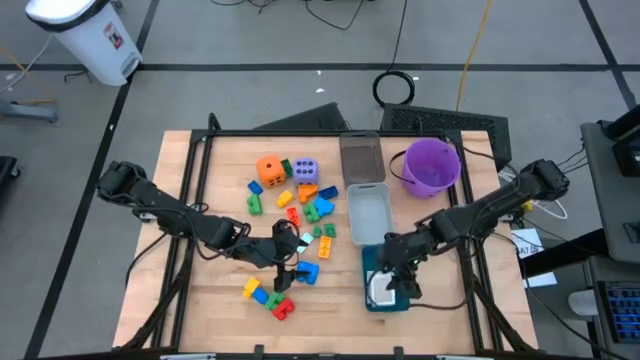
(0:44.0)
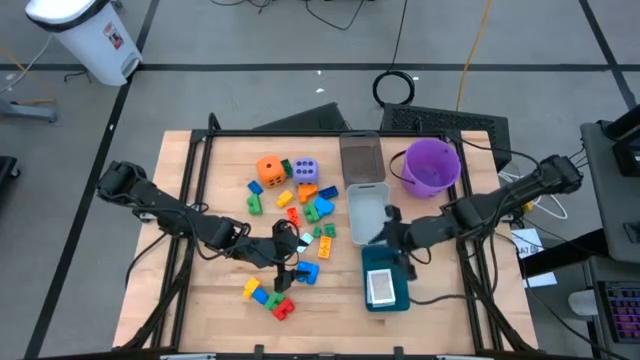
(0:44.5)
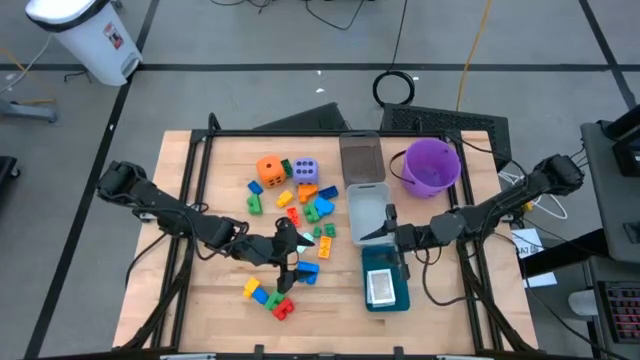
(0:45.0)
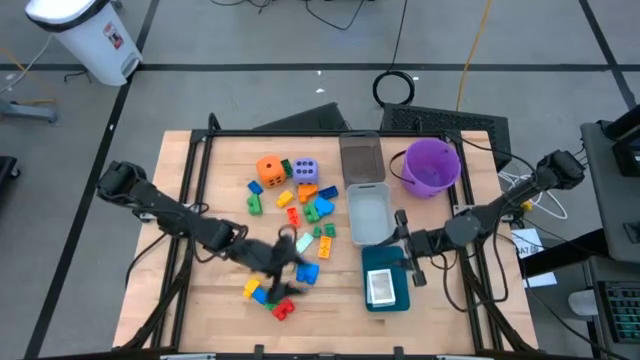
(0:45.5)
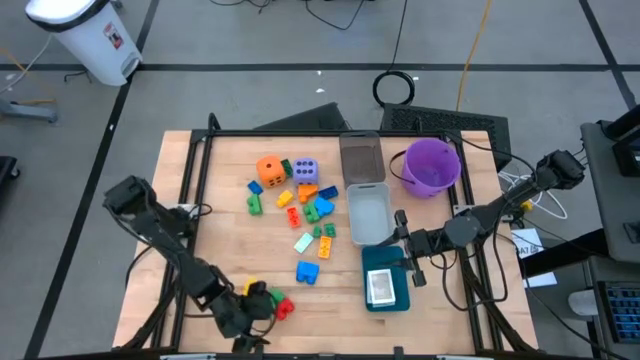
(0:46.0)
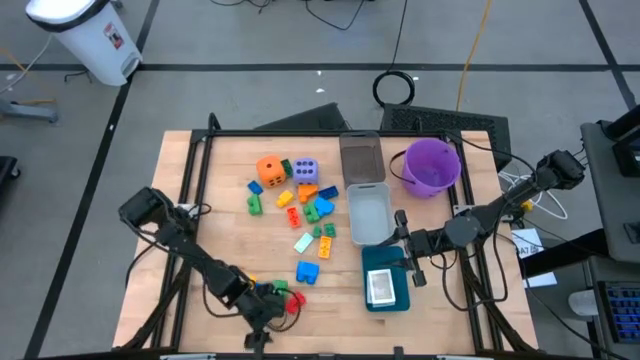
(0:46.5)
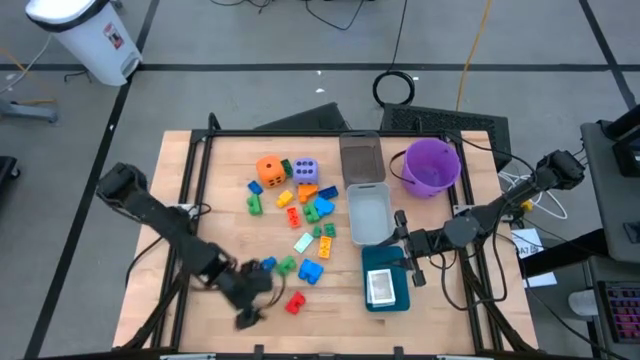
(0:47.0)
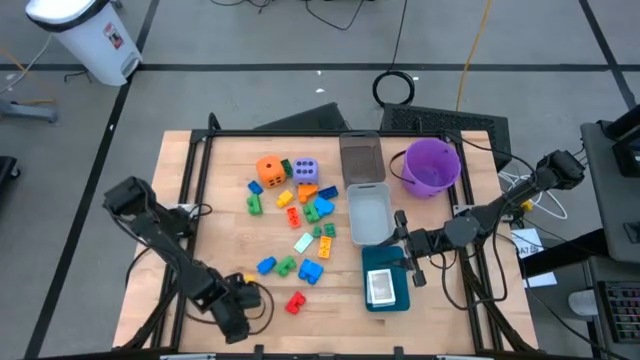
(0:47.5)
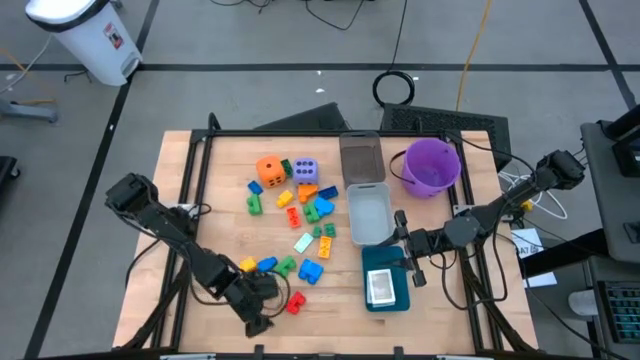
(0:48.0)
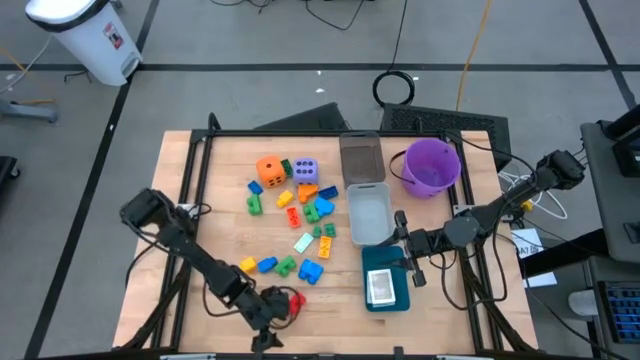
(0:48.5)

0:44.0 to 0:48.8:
Task: Pick & Place Toys
Adjust the game piece on the table

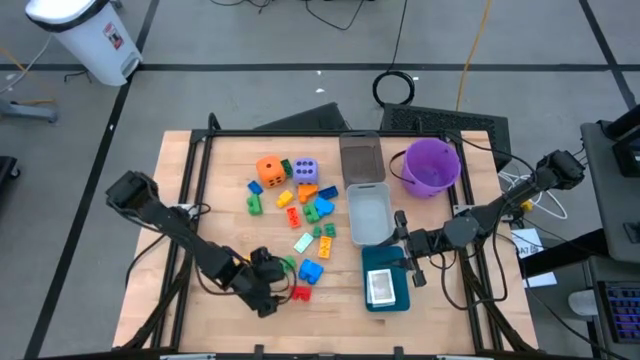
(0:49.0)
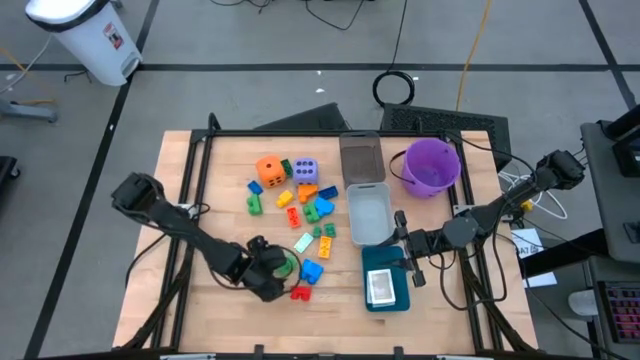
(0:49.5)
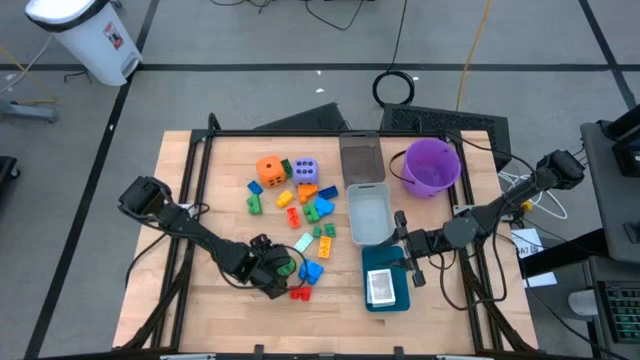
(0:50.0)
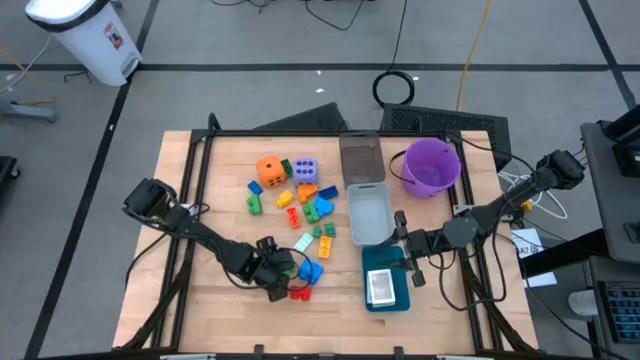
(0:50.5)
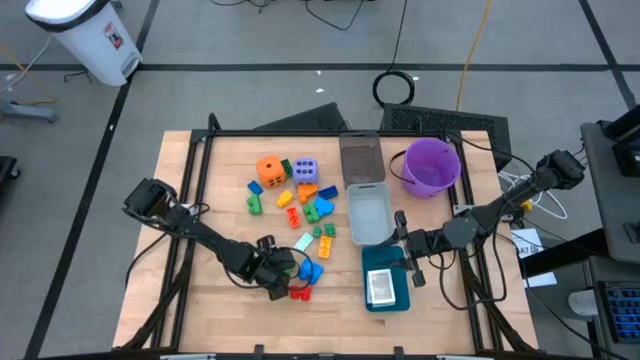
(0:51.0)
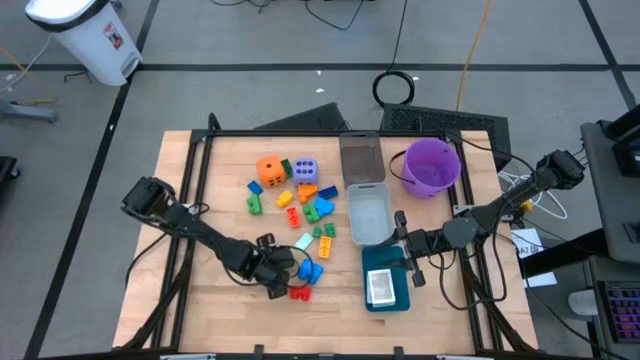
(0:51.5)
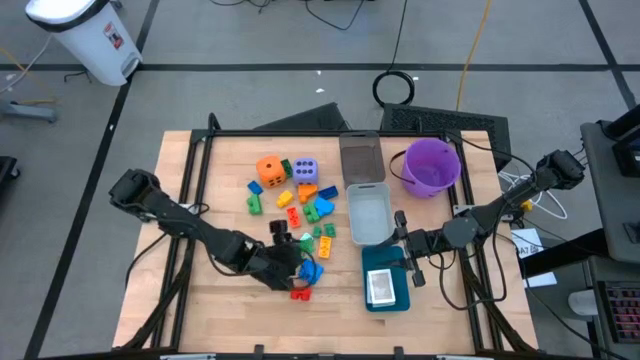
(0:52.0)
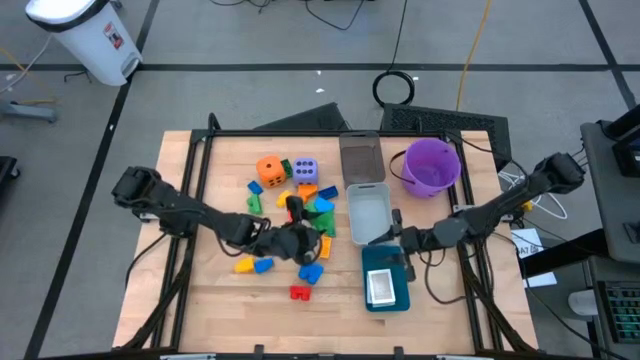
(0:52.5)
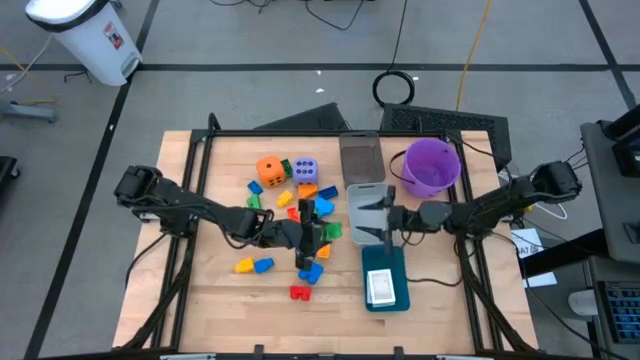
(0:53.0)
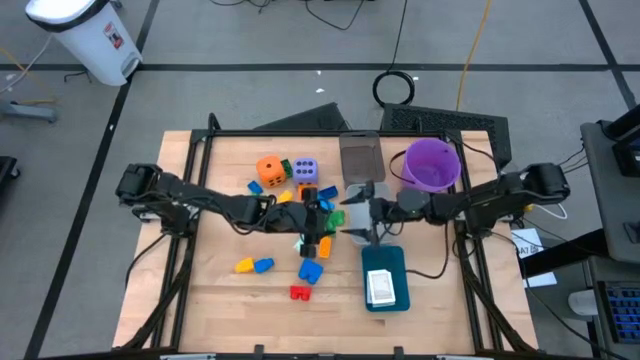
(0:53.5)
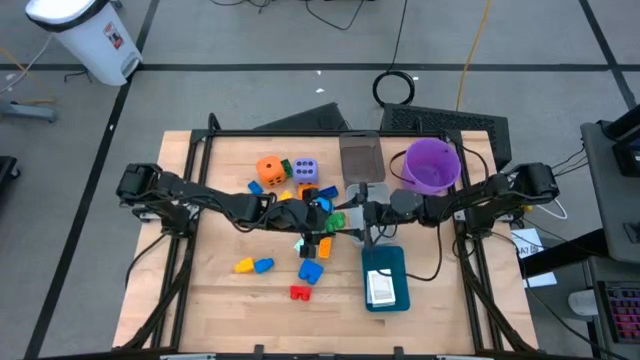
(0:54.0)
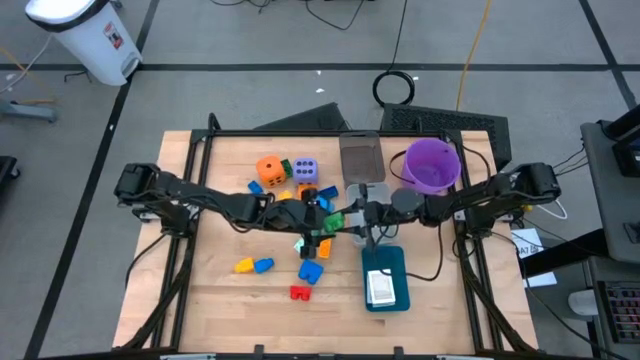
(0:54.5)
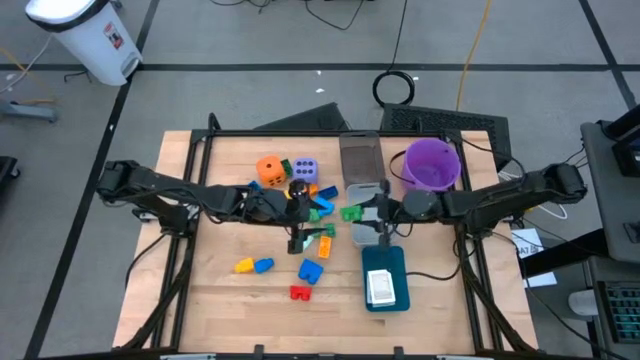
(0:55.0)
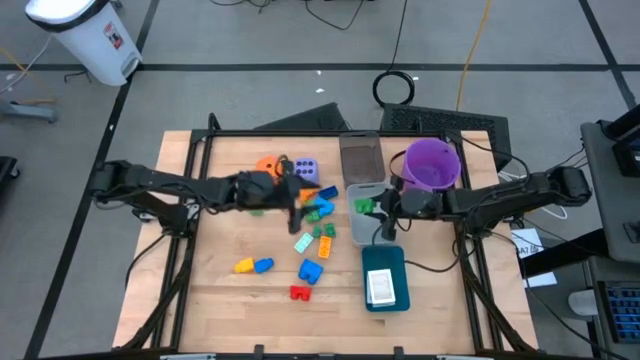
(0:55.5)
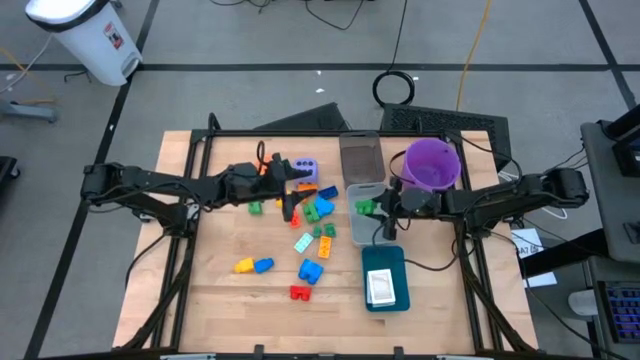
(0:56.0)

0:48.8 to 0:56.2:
Put the green game piece into the gray bin

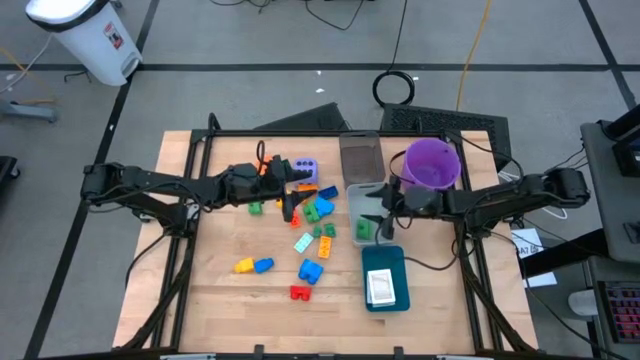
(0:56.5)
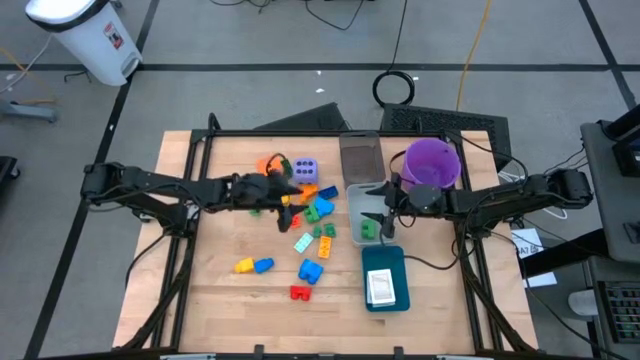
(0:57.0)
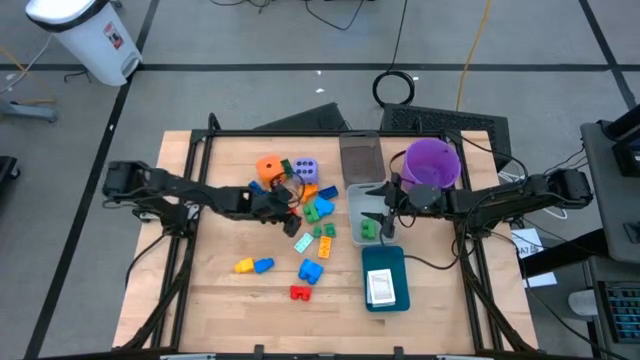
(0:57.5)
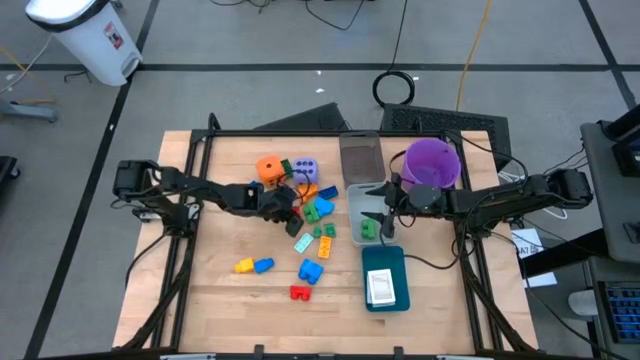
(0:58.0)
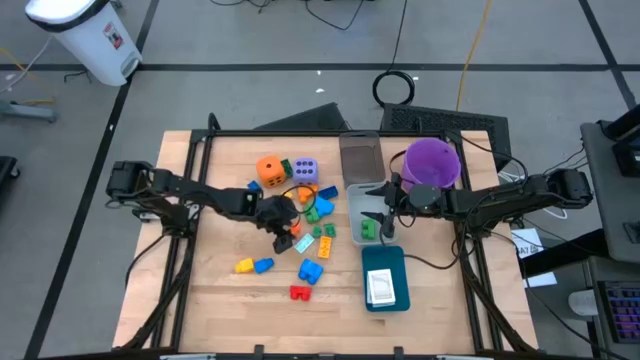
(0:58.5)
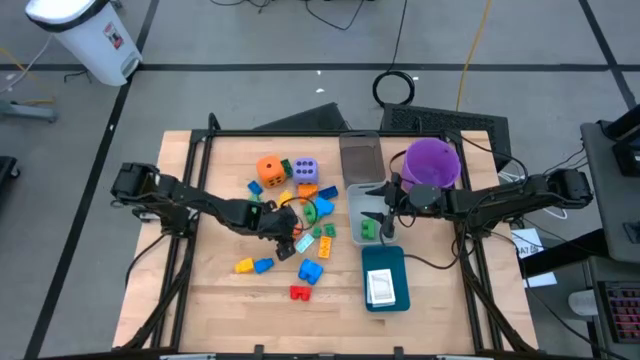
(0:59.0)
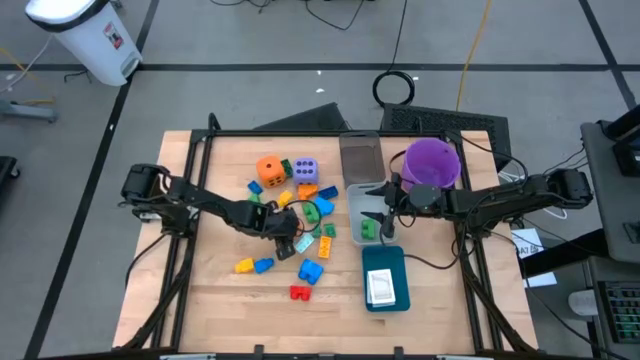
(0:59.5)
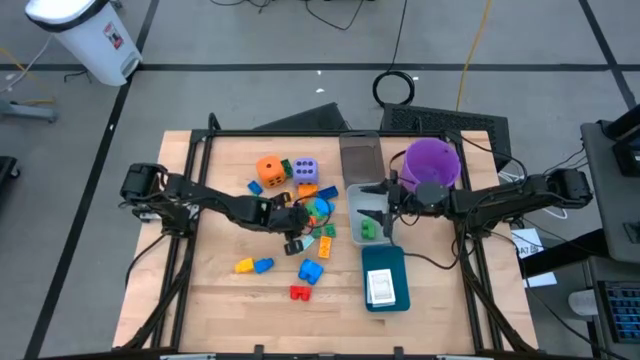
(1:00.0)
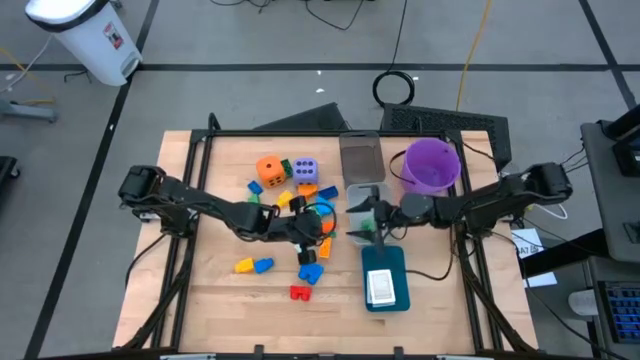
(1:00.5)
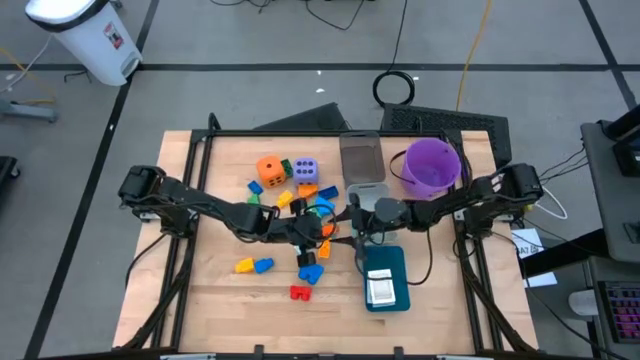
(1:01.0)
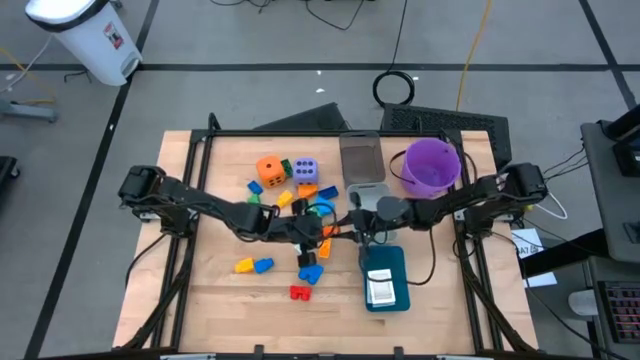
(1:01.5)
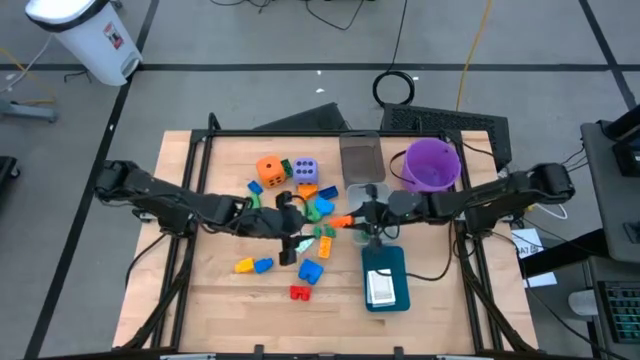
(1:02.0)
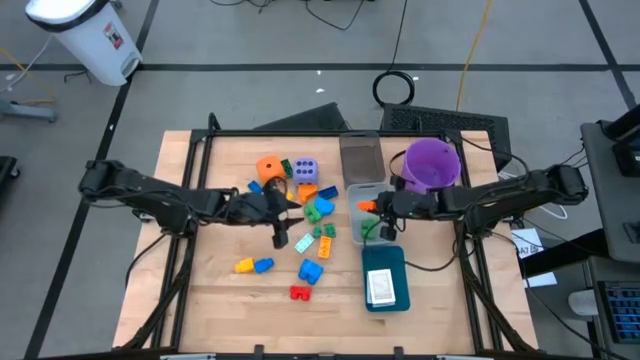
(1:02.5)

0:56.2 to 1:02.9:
Put the orange game piece into the gray bin

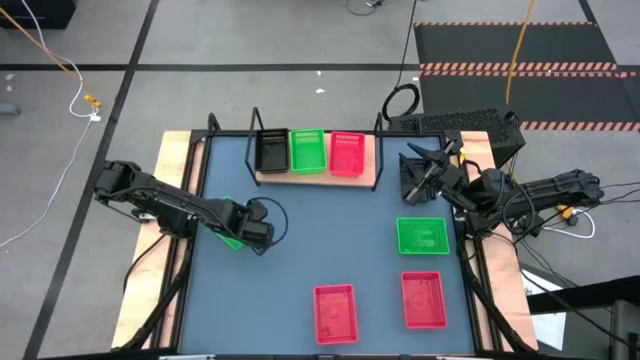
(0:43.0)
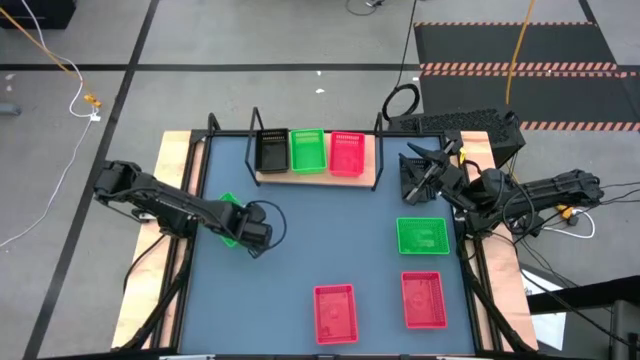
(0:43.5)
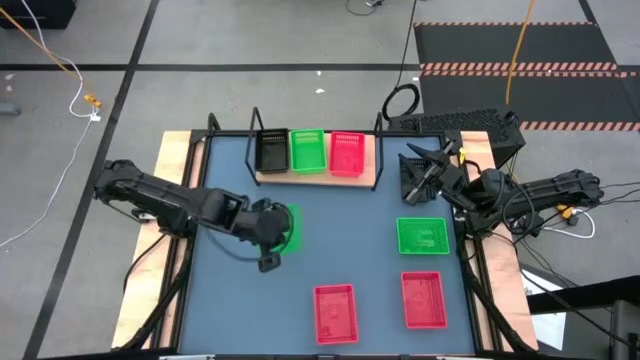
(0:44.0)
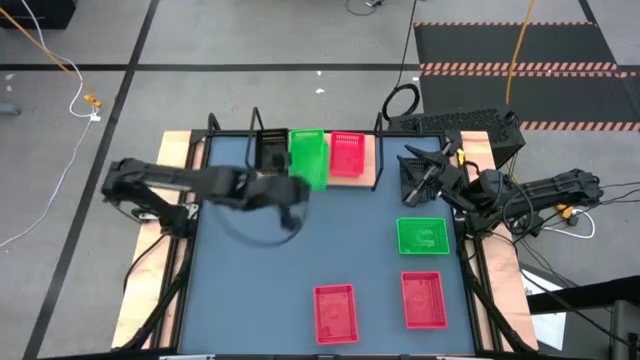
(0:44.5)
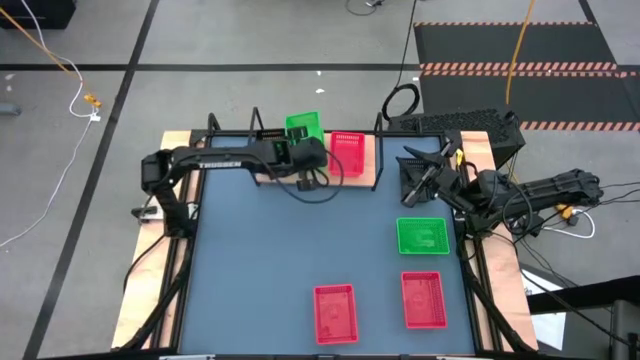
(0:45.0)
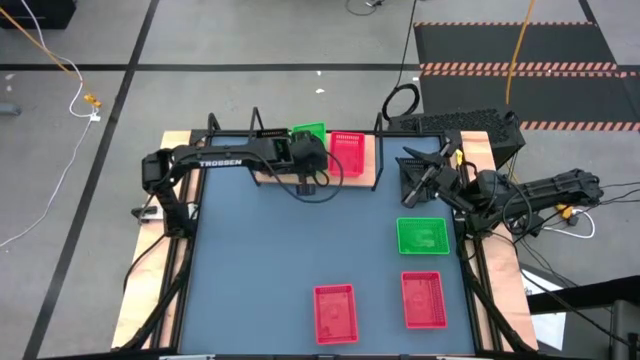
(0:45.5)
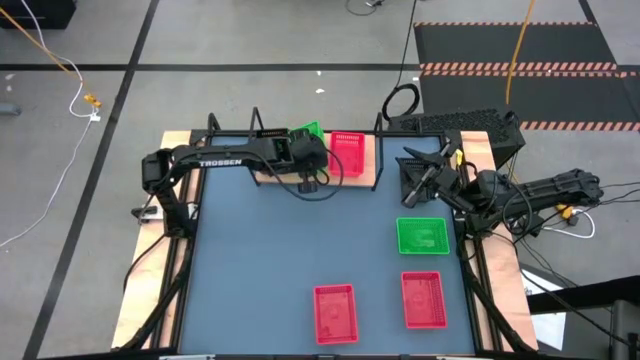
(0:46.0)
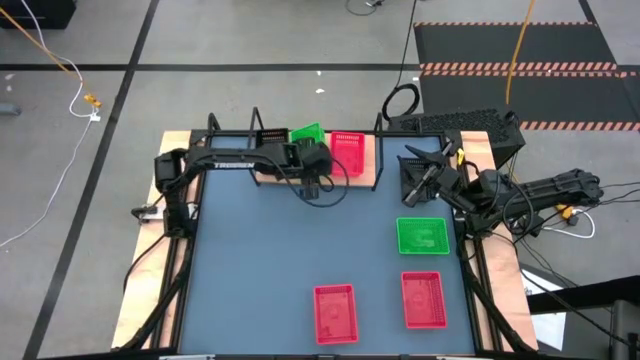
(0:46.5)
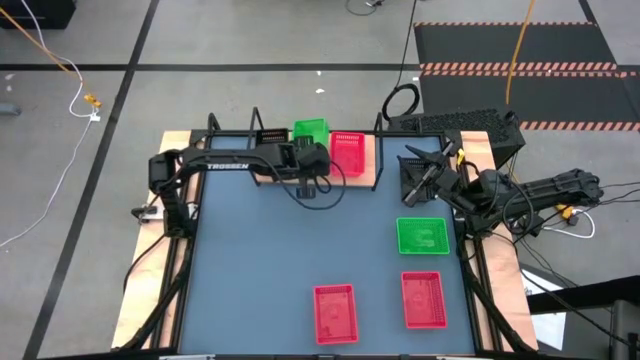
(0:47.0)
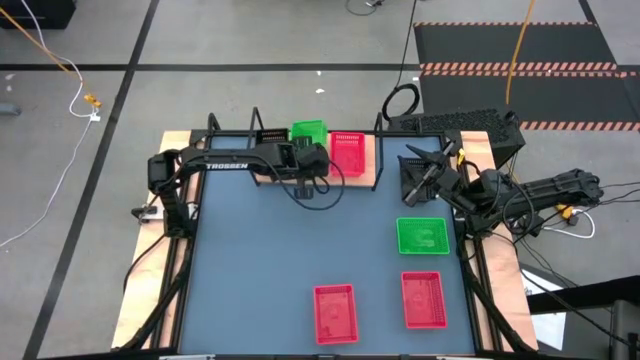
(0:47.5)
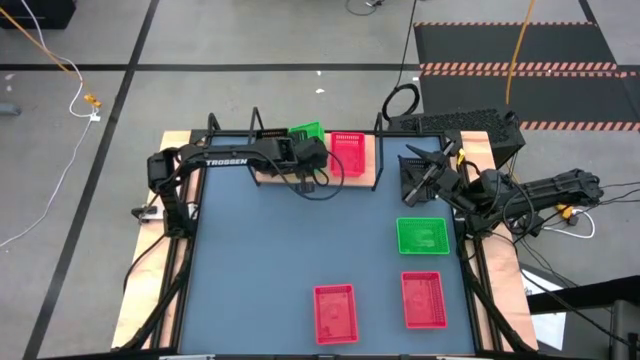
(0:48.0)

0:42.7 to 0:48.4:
Task: Stack baskets on shelf by color
Stack the left green bin on top of the green bin on the shelf
